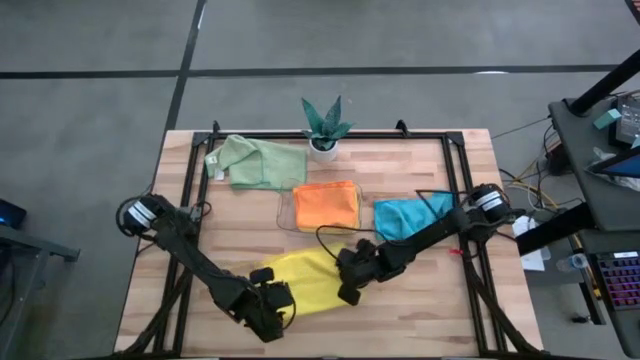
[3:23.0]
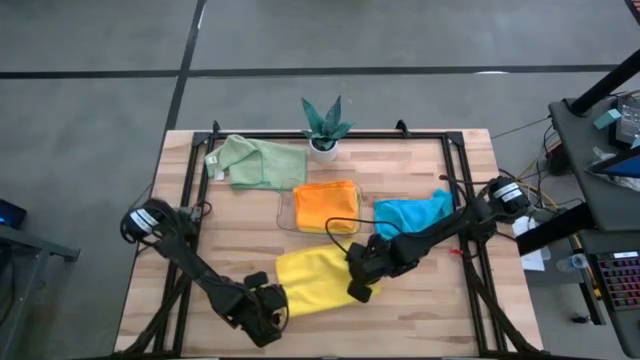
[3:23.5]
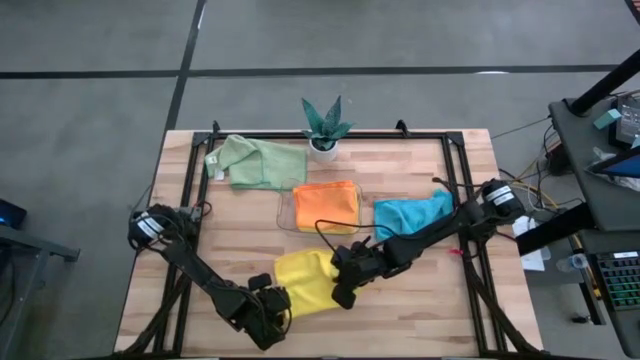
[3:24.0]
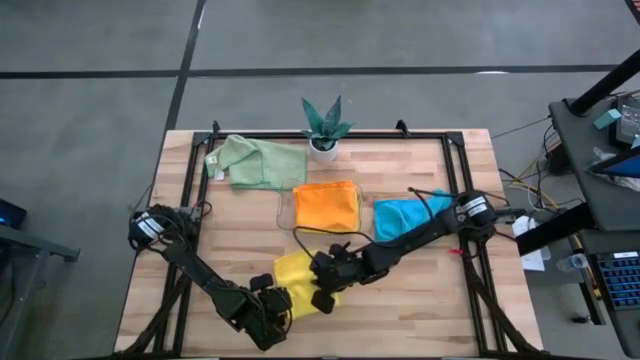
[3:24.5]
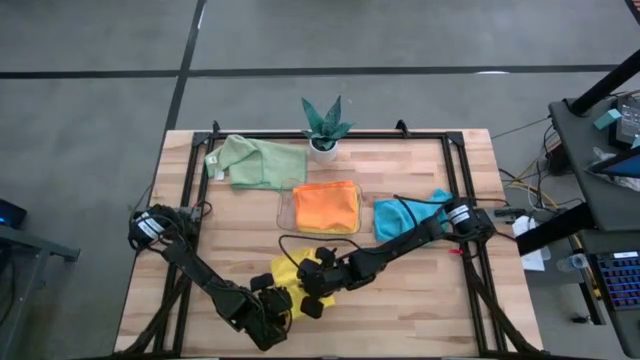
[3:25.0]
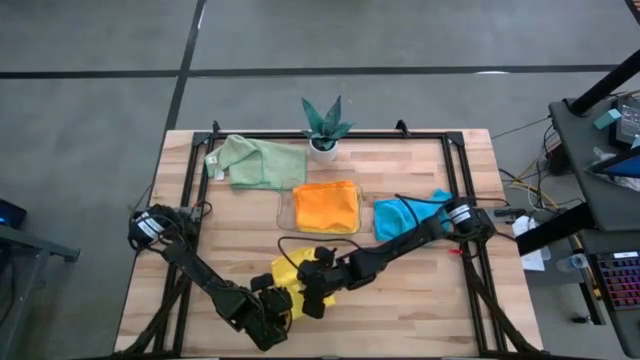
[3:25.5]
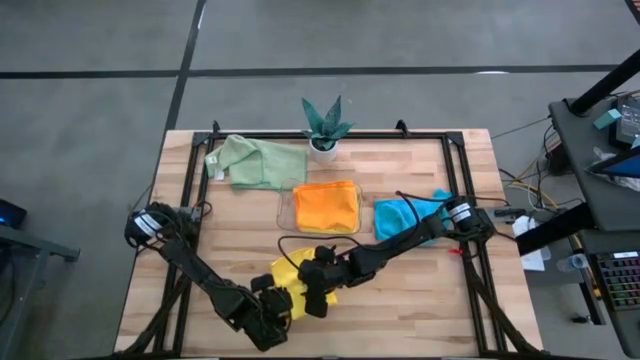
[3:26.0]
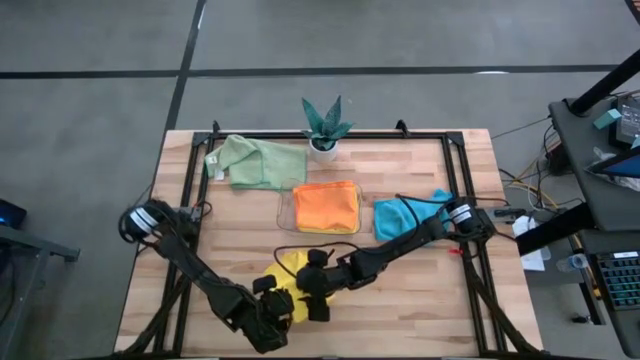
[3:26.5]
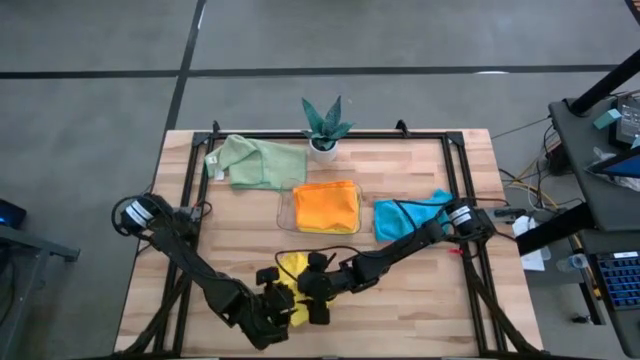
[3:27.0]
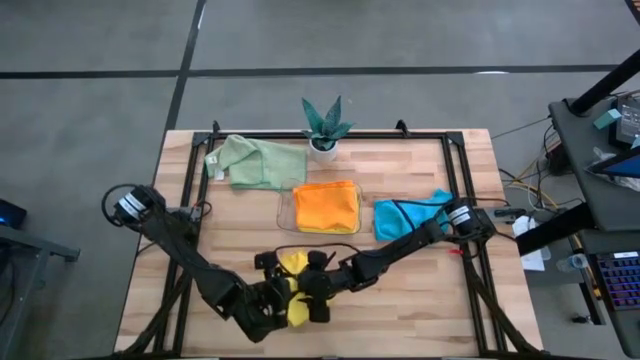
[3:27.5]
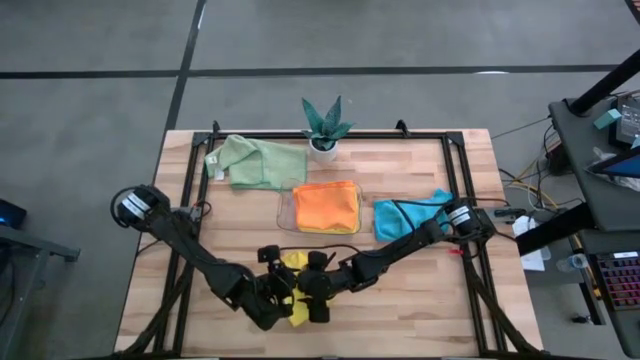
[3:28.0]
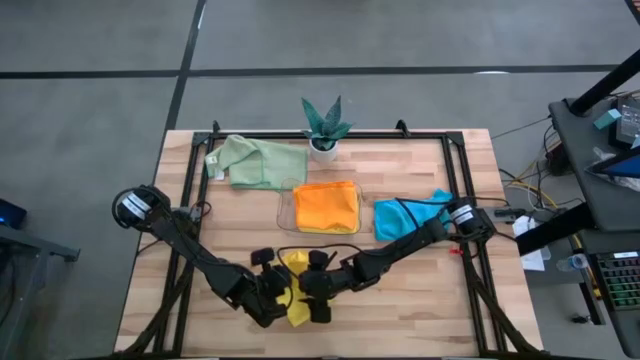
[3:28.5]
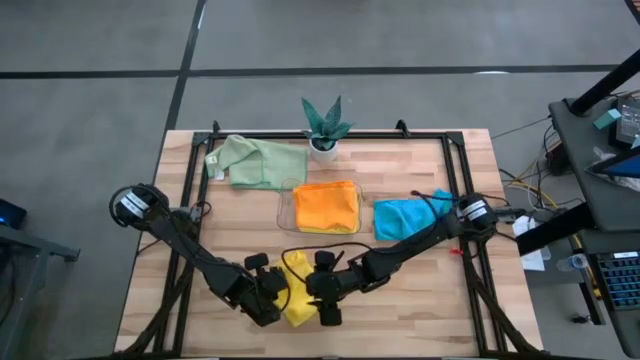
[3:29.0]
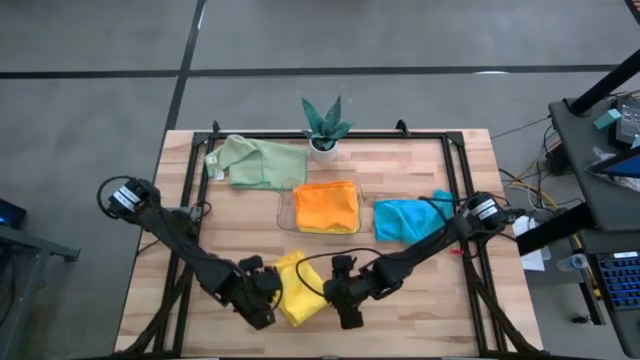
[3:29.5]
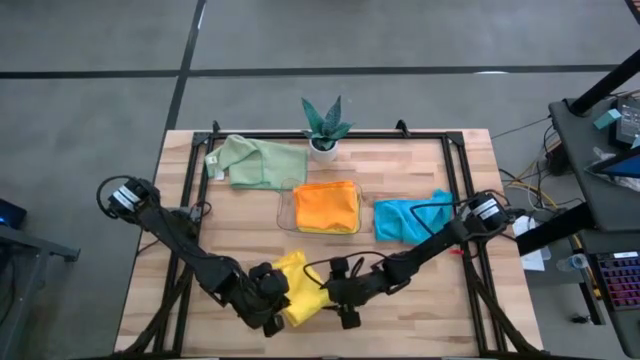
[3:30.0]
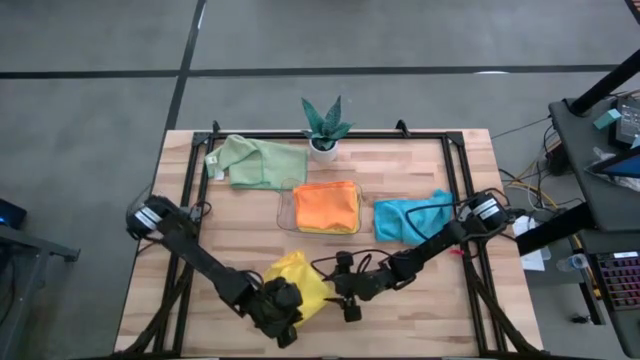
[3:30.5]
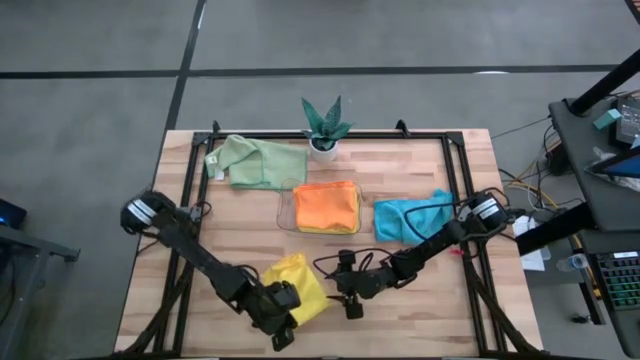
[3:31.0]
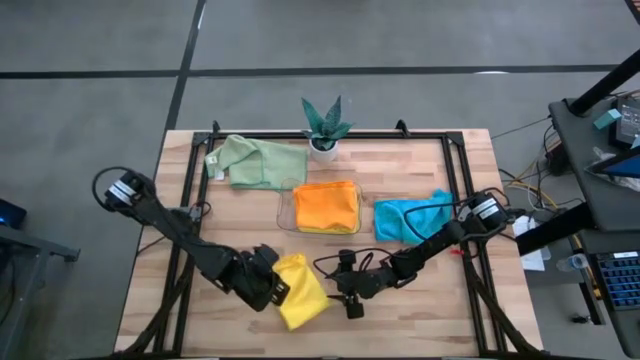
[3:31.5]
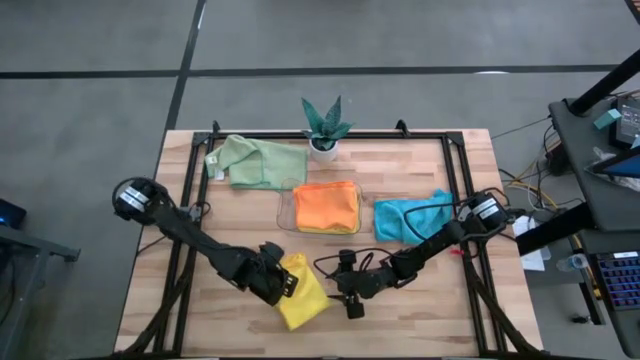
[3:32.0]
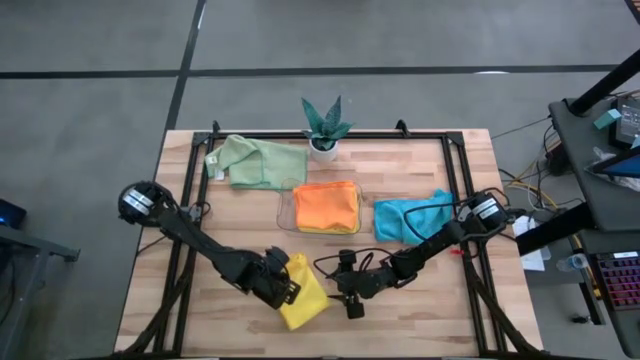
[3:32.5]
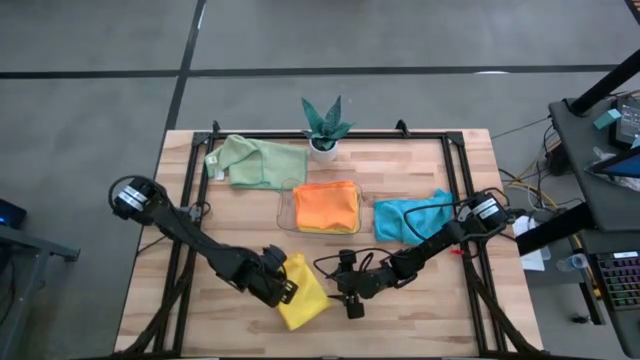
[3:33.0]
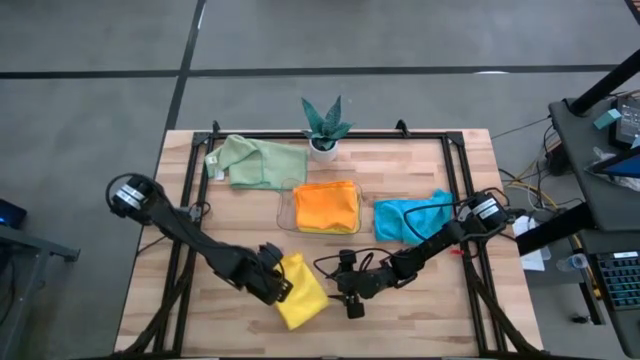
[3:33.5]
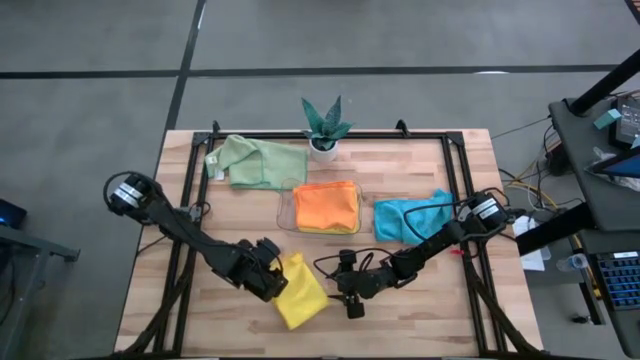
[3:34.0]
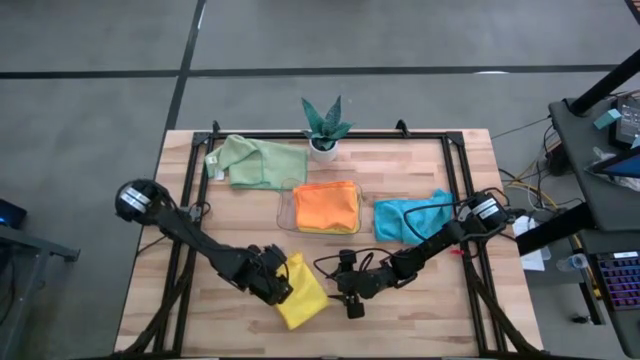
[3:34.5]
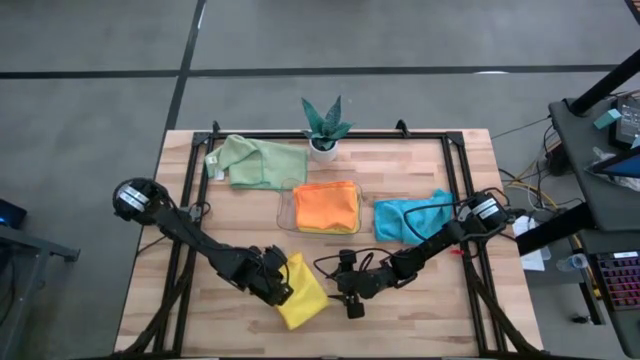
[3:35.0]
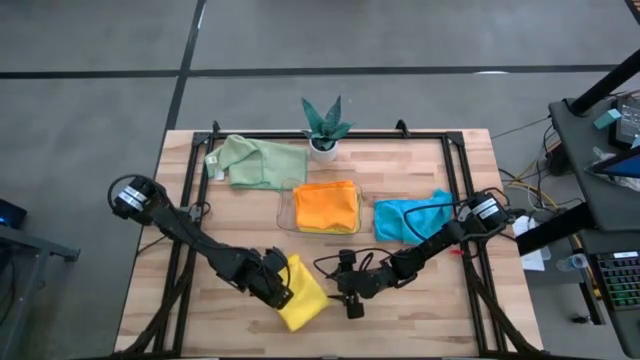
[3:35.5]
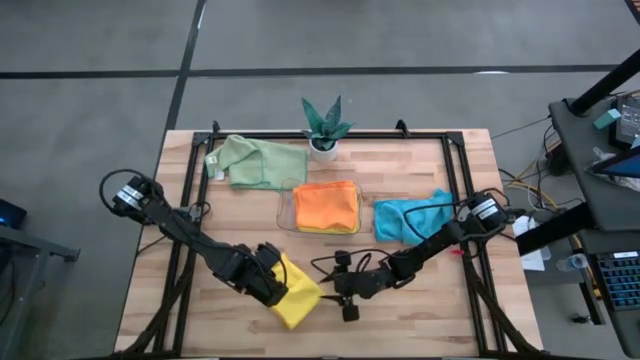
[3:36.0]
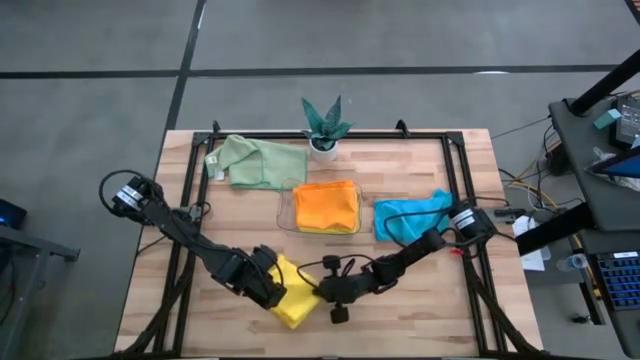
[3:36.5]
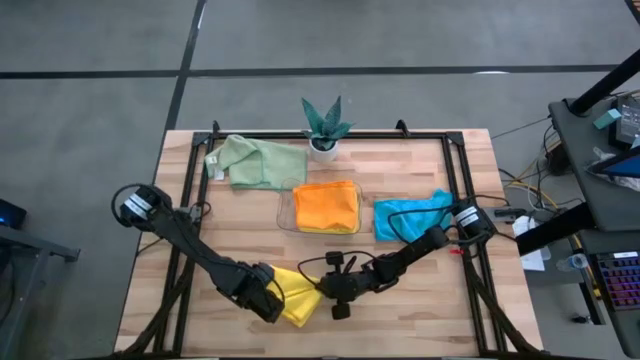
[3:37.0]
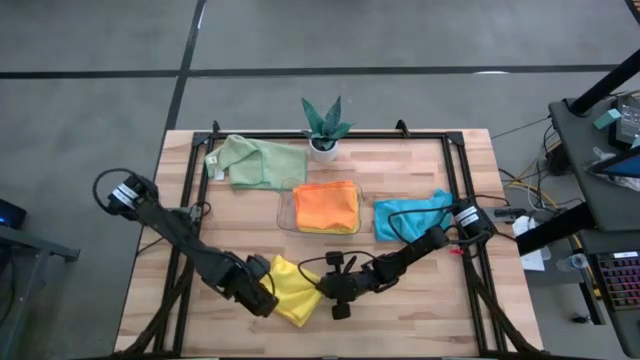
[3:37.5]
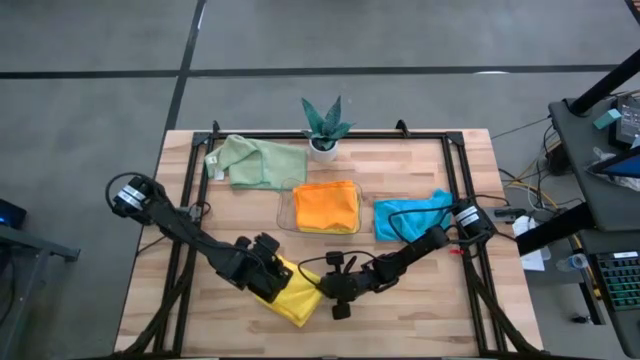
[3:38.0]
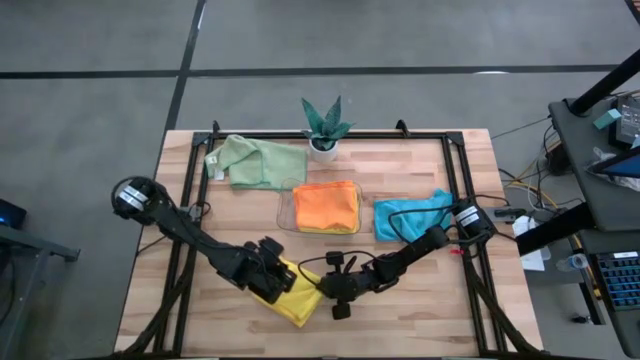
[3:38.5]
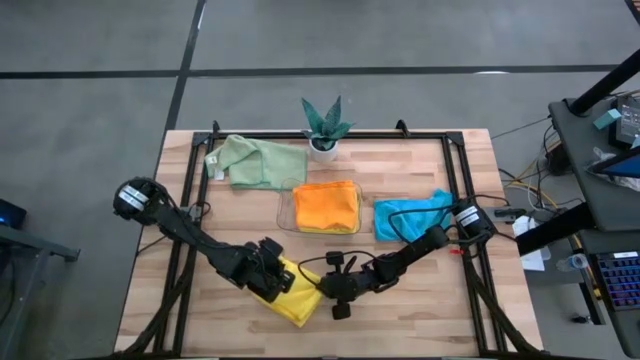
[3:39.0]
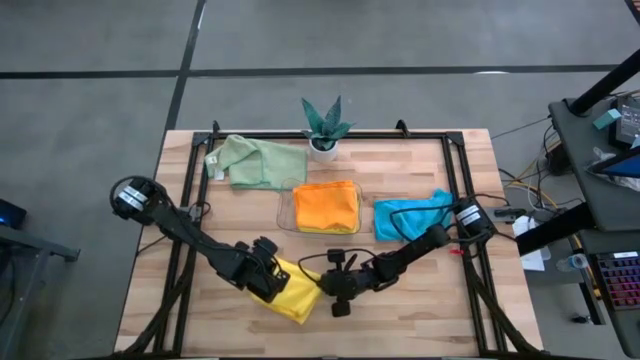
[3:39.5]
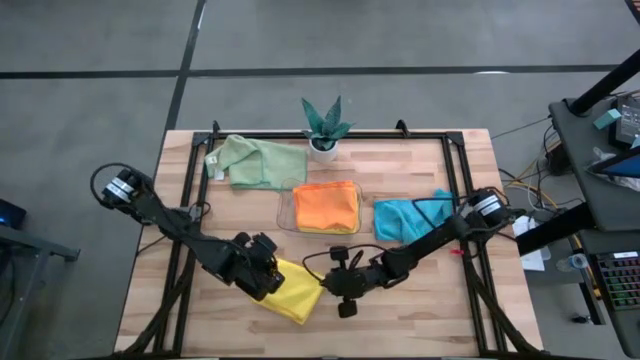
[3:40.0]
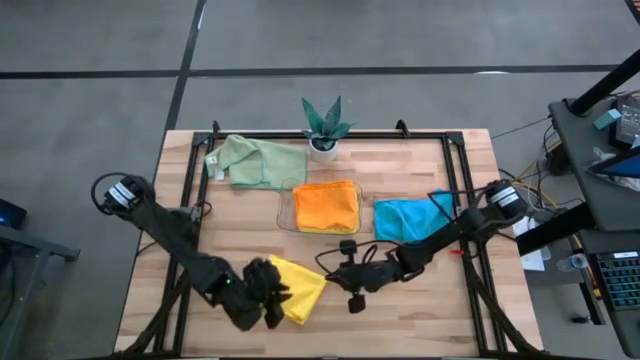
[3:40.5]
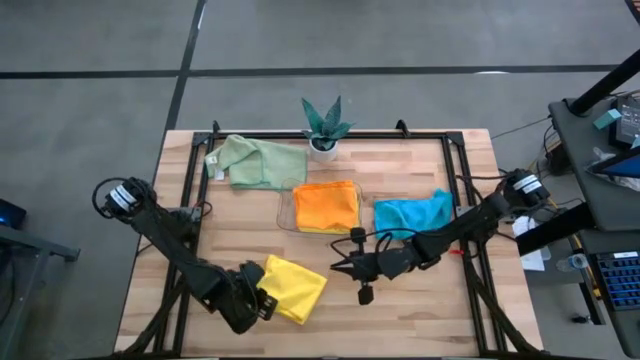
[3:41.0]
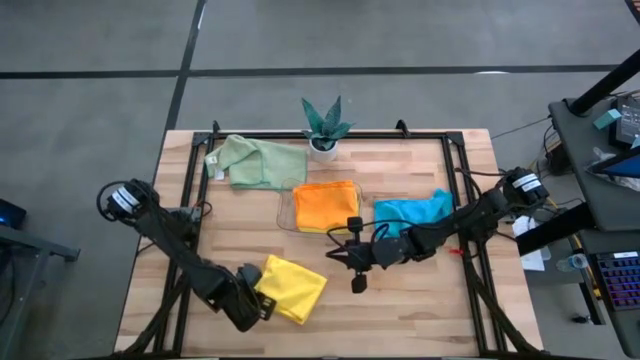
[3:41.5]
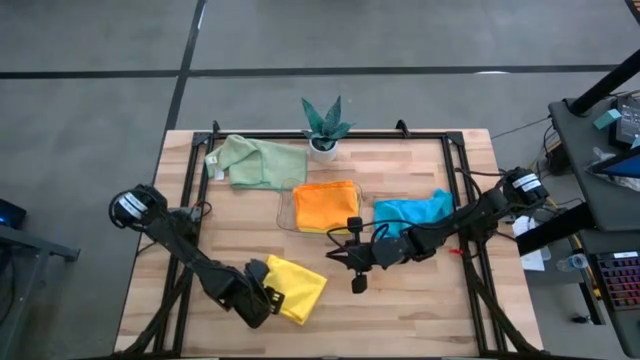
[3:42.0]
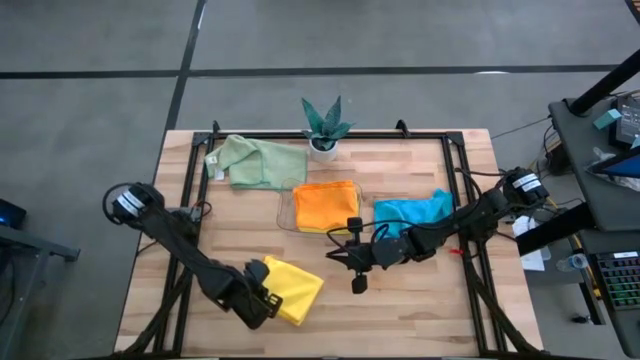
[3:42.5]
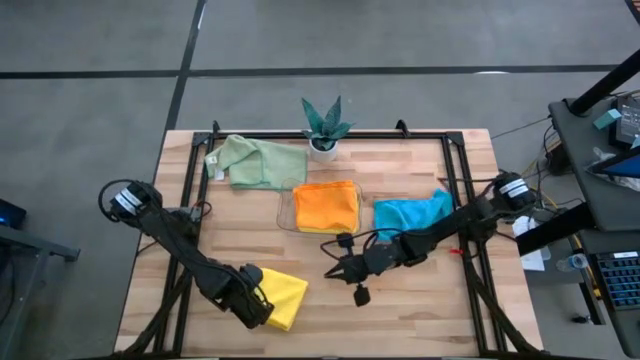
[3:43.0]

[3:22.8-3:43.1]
Task: Fold microfiber towels
Fold the yellow microfiber towel
